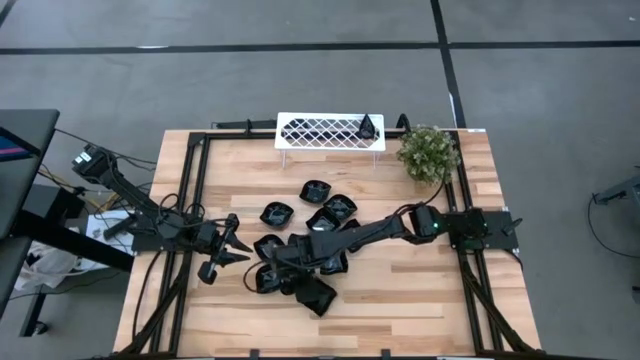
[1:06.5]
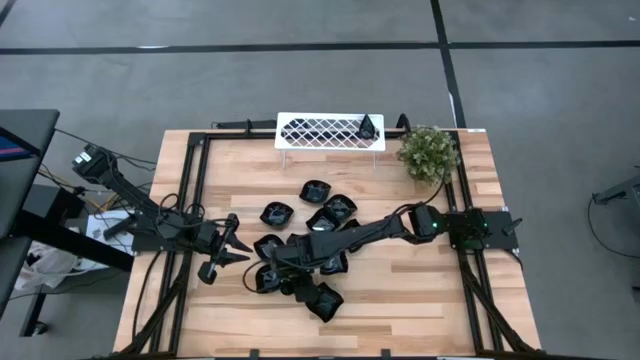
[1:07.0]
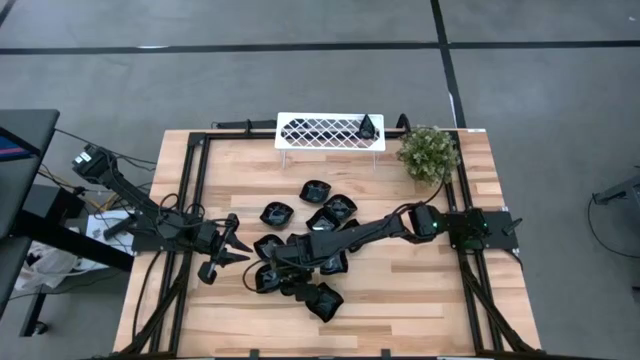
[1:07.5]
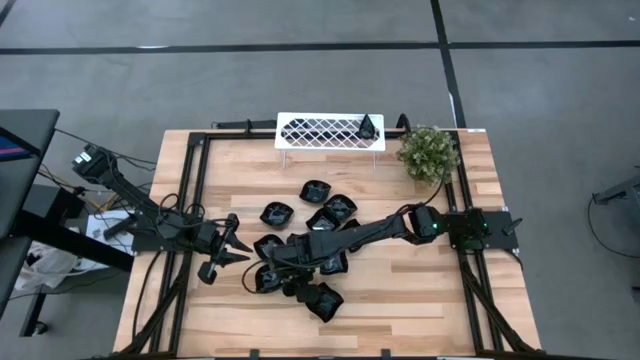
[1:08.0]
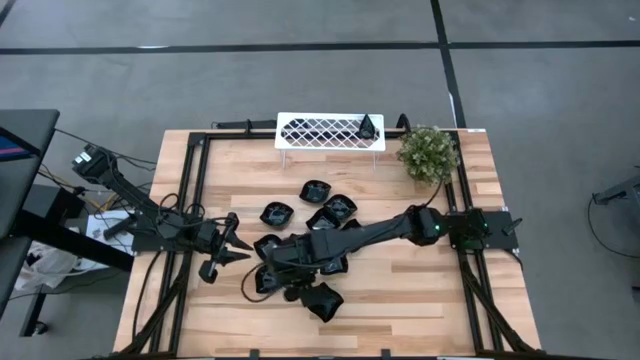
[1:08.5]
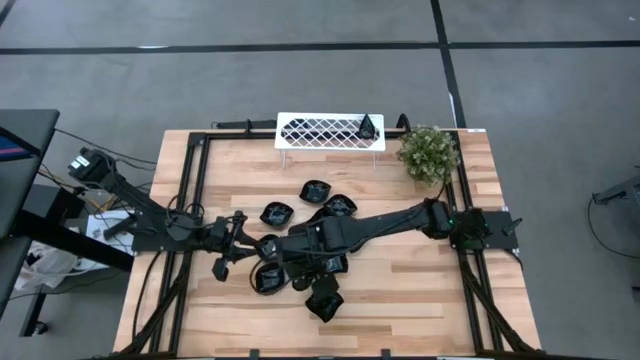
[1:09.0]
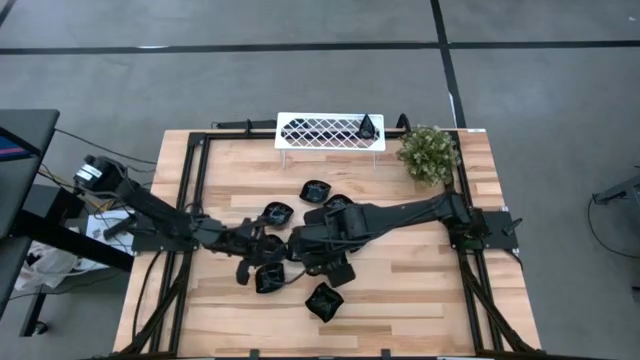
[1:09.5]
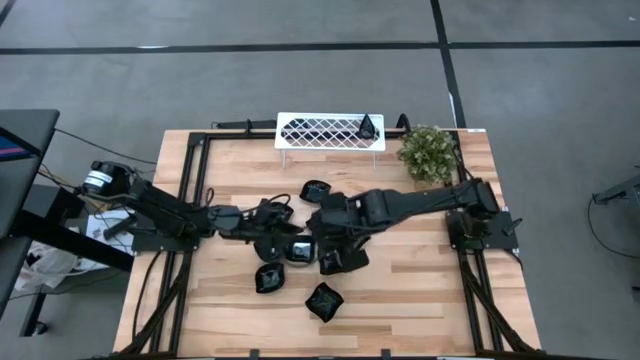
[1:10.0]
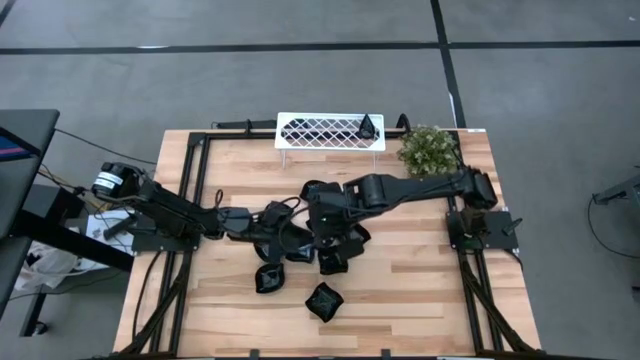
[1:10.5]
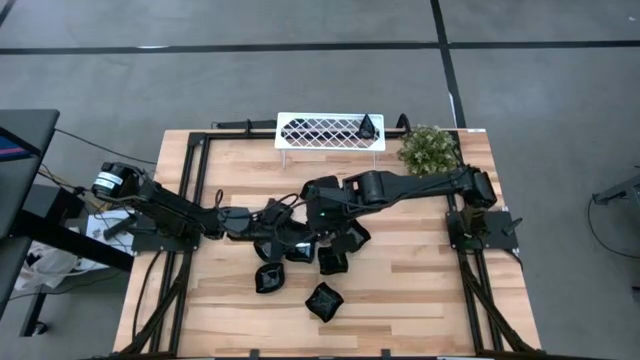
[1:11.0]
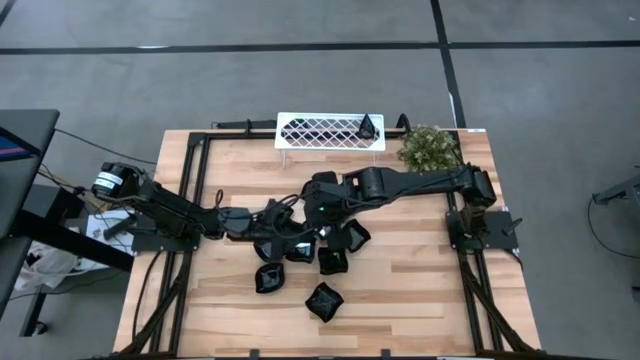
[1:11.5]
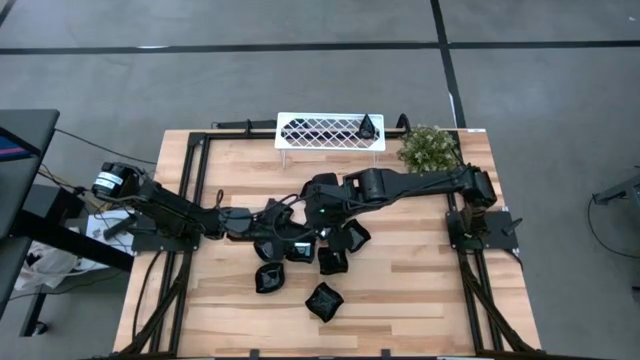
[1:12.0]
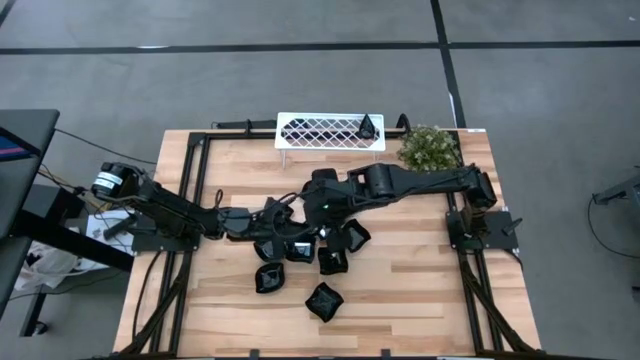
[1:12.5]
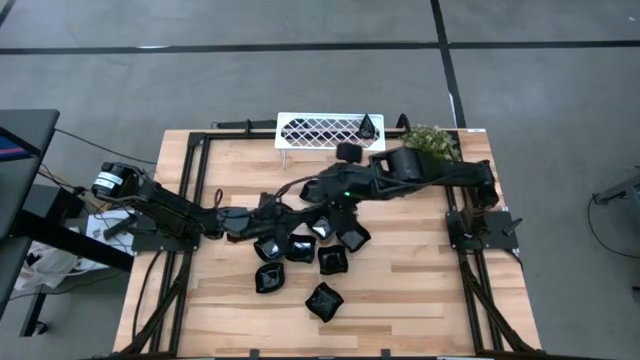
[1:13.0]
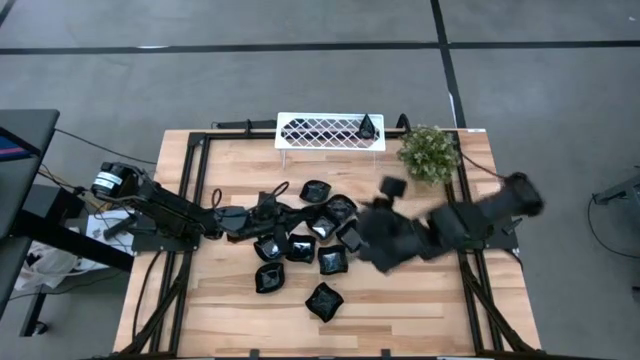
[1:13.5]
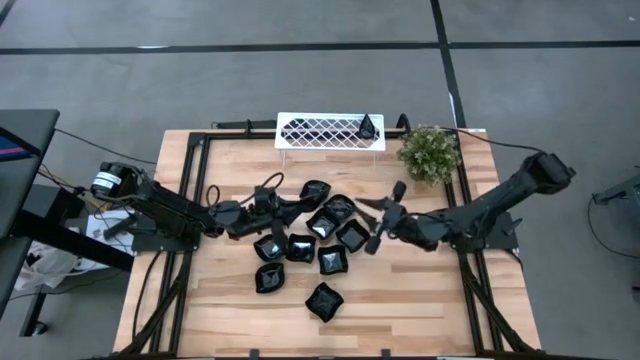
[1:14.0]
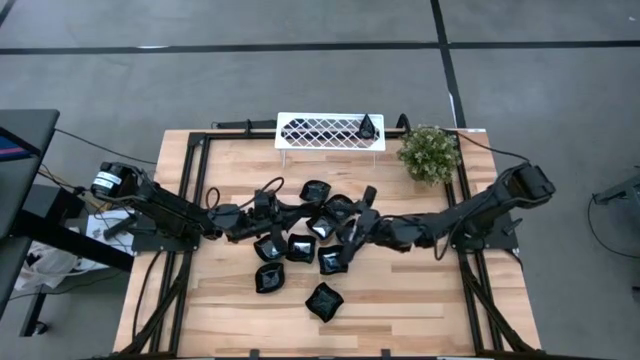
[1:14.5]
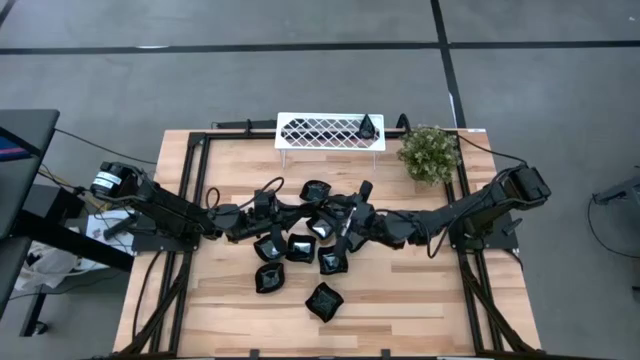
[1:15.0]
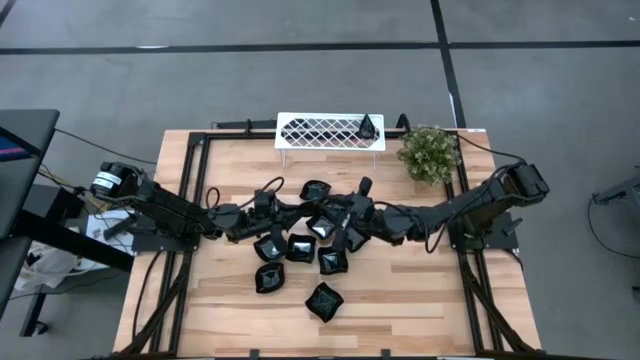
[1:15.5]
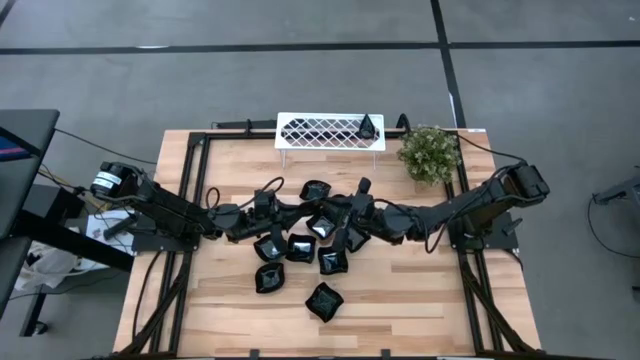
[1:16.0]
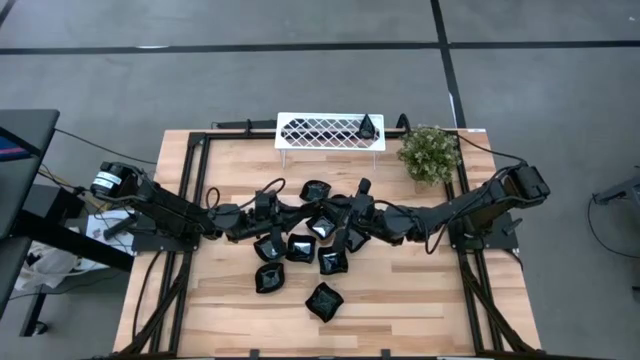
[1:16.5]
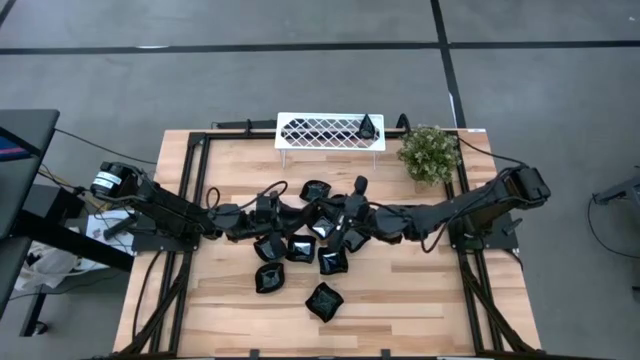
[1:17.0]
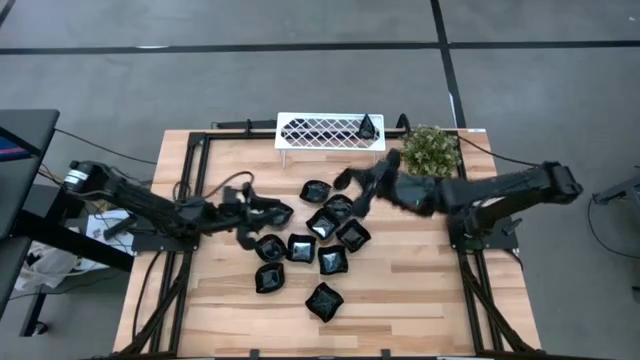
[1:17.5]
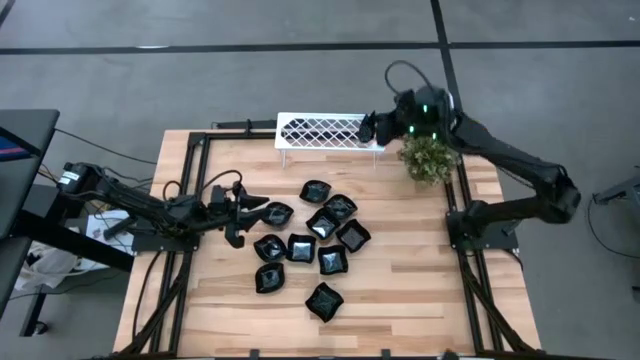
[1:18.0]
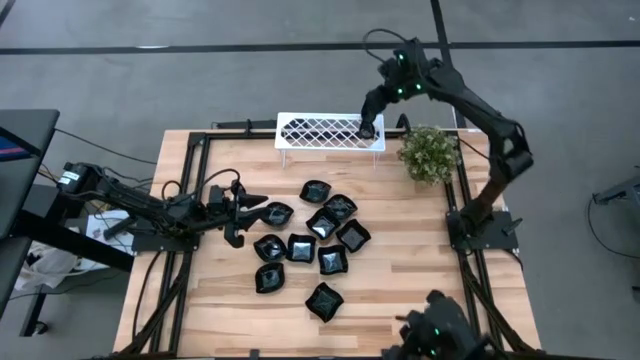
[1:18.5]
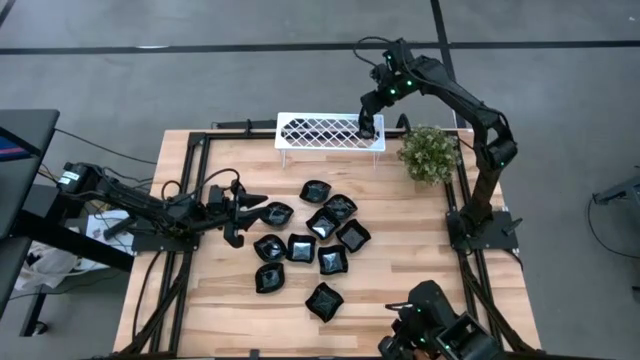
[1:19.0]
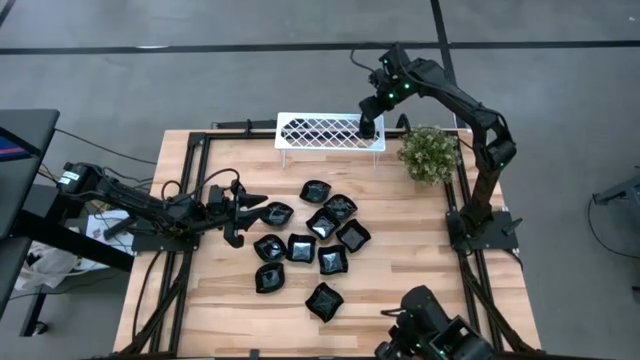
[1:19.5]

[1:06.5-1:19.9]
Task: Pick & Place Mini shaped plates
Stack the drop-shaped plate on top of the drop-shaped plates on the shelf

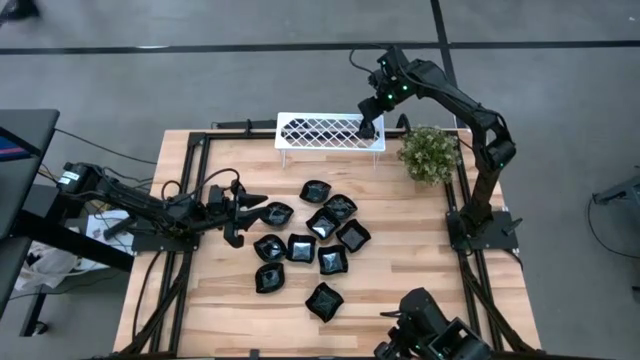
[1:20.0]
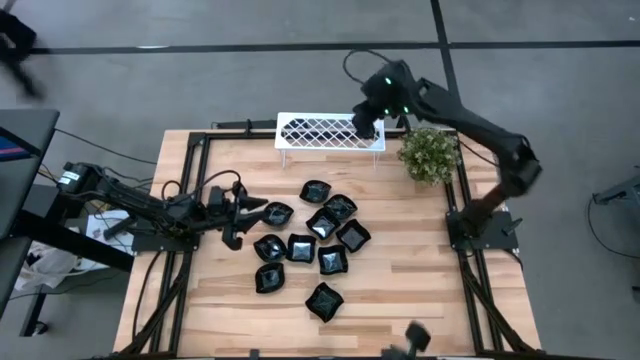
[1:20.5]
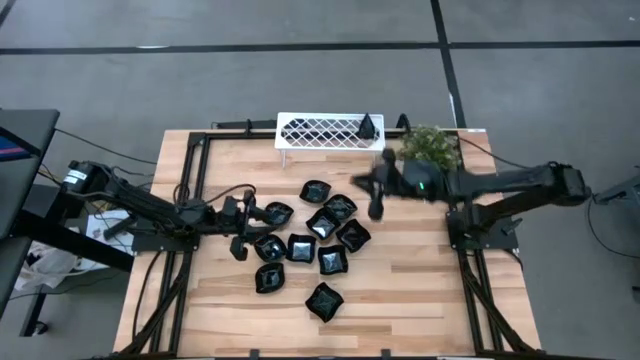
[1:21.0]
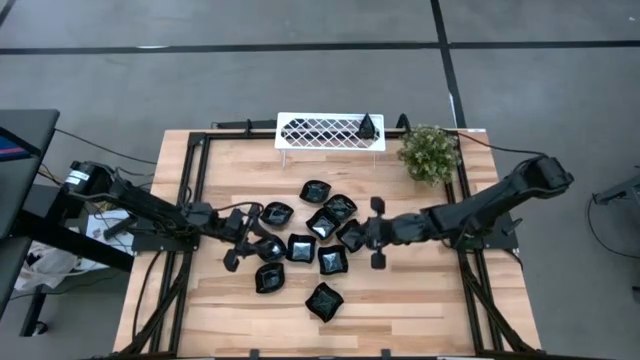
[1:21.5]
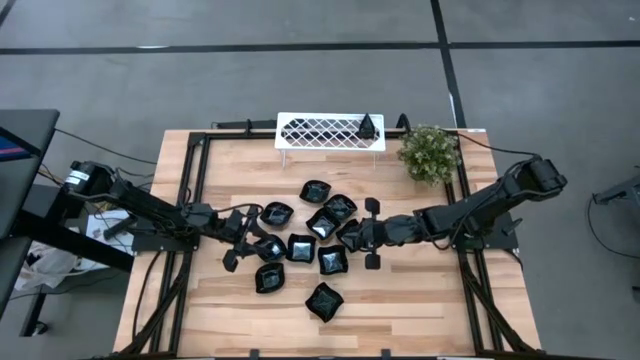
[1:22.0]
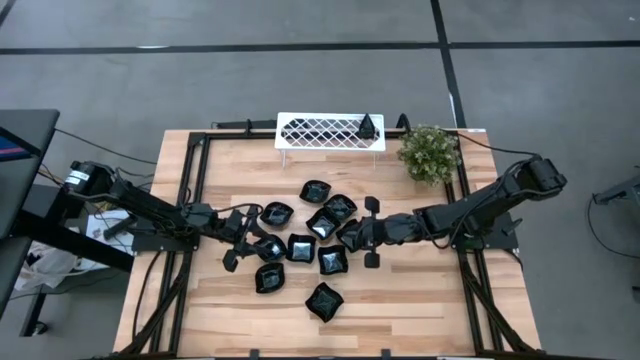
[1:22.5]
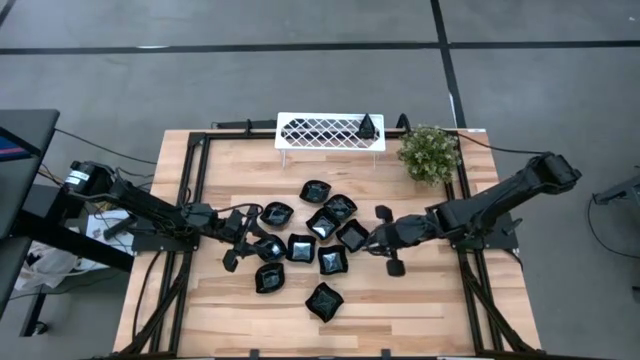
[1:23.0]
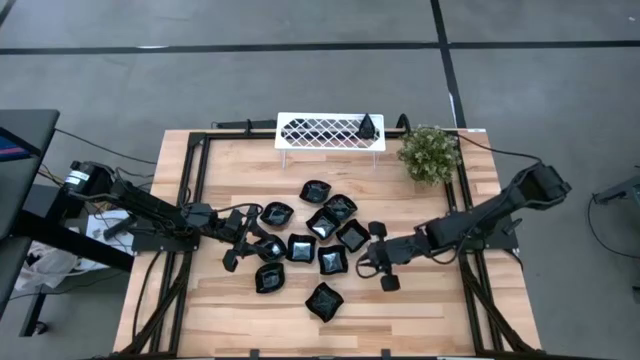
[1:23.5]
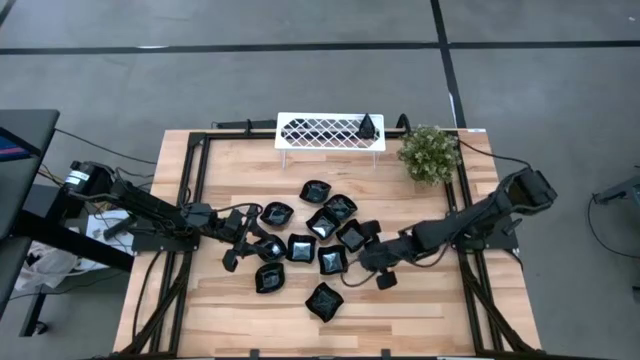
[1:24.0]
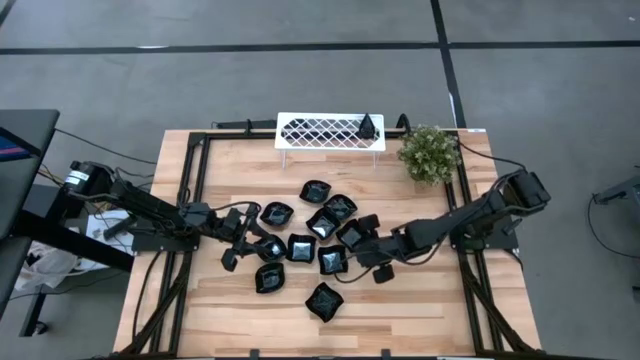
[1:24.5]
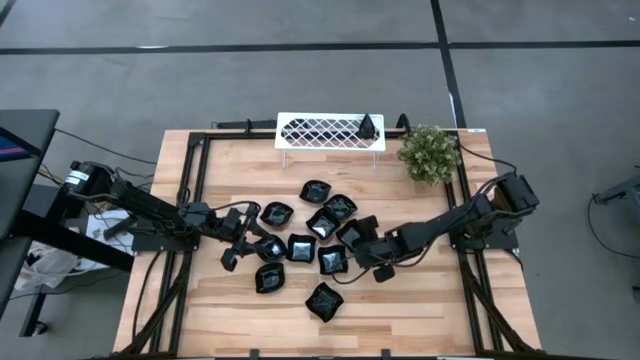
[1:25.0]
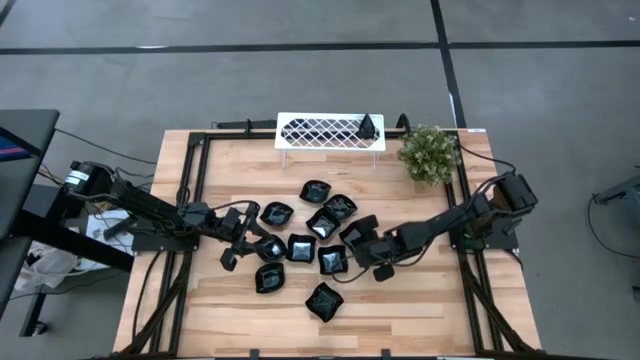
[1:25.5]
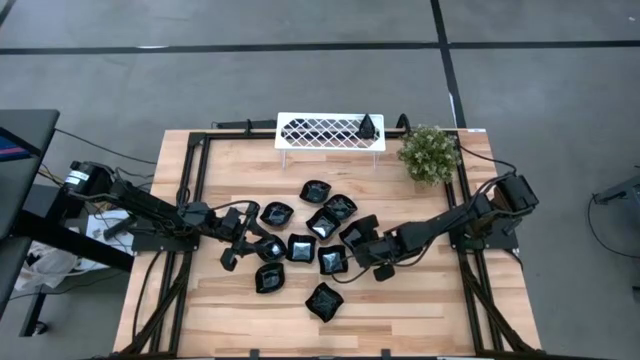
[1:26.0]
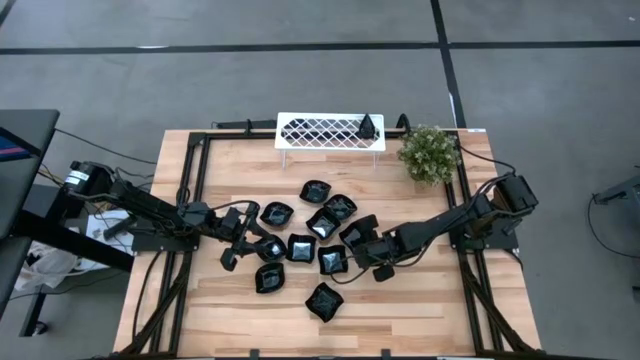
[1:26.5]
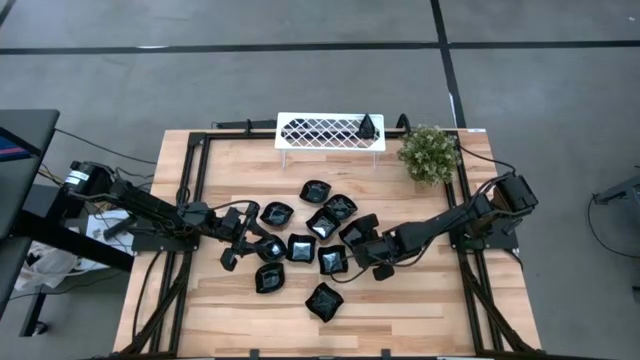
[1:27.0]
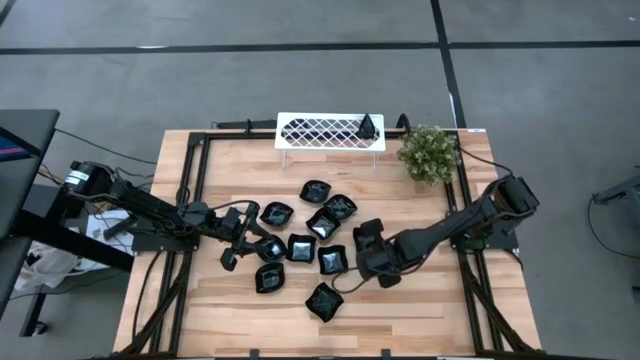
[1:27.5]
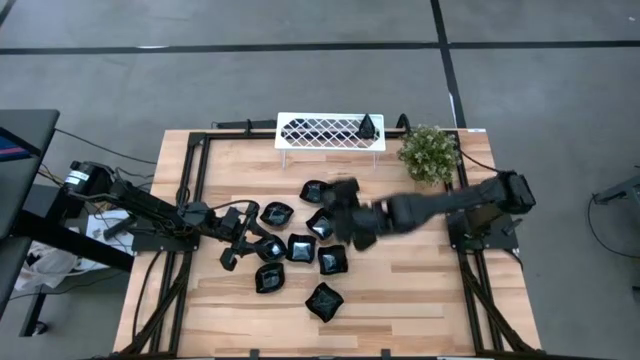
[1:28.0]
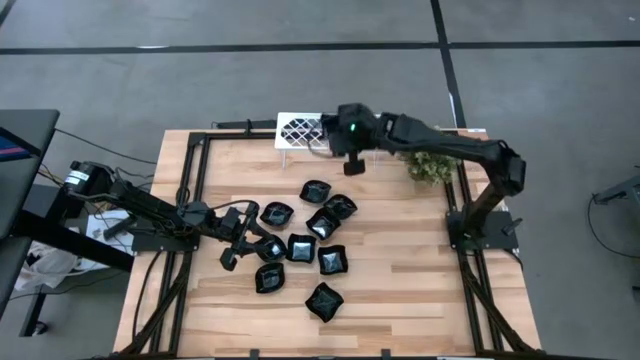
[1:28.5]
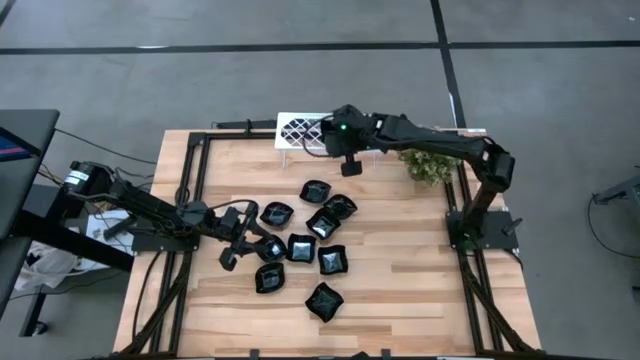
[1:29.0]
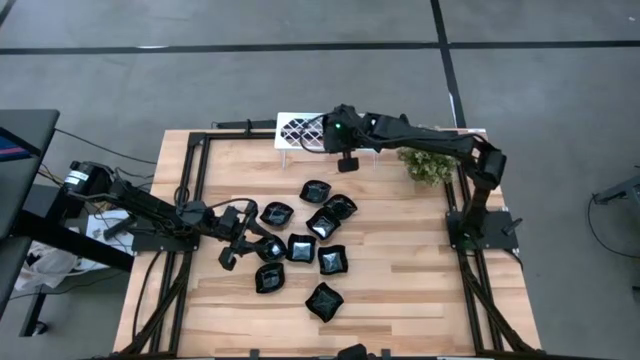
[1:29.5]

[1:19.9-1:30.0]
Put the distorted square plate on the shelf
